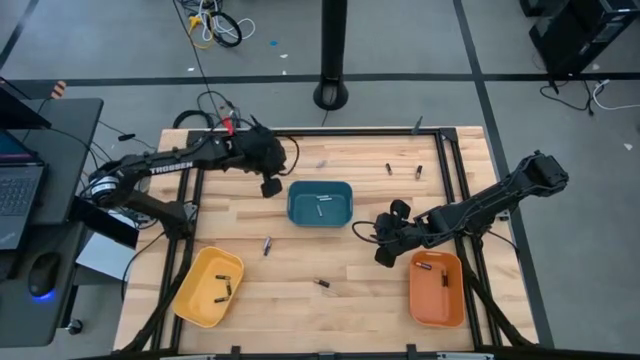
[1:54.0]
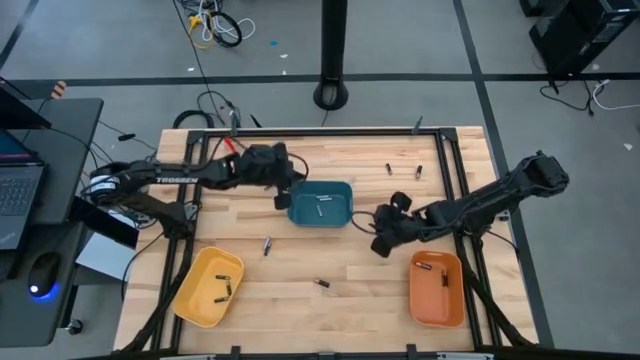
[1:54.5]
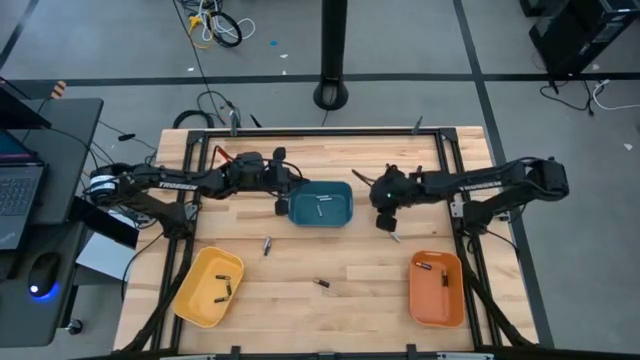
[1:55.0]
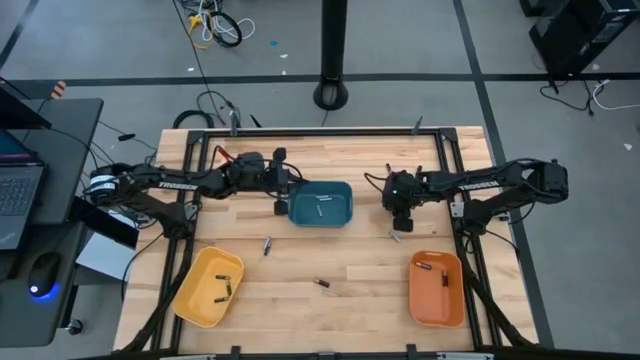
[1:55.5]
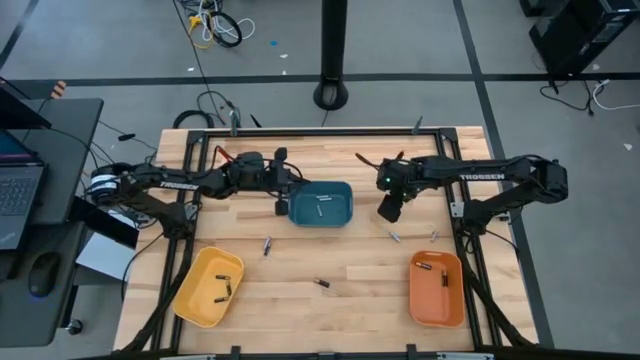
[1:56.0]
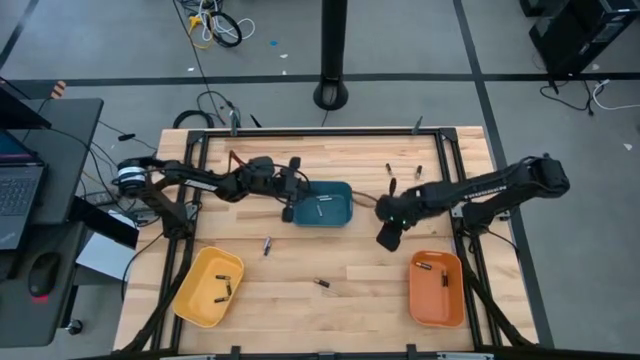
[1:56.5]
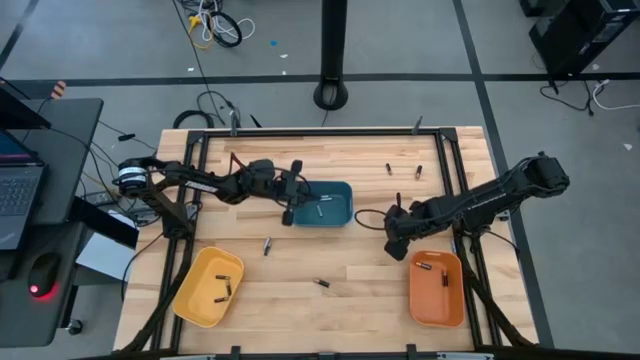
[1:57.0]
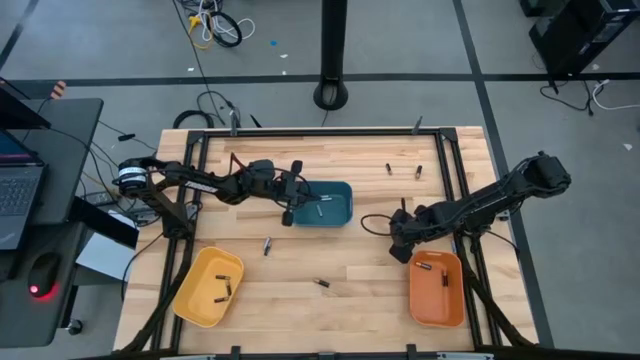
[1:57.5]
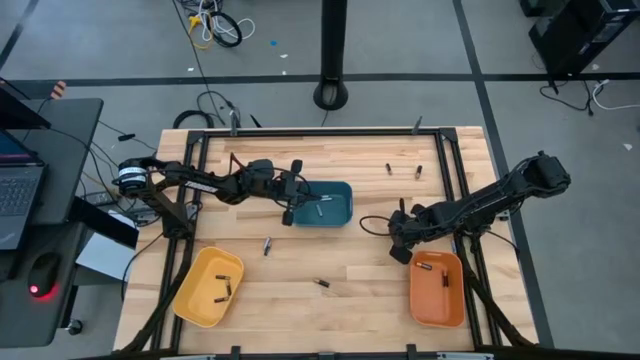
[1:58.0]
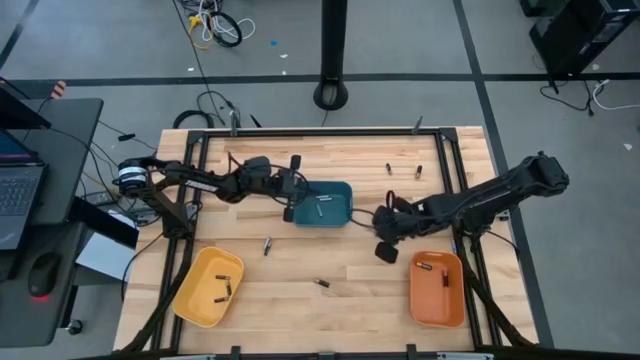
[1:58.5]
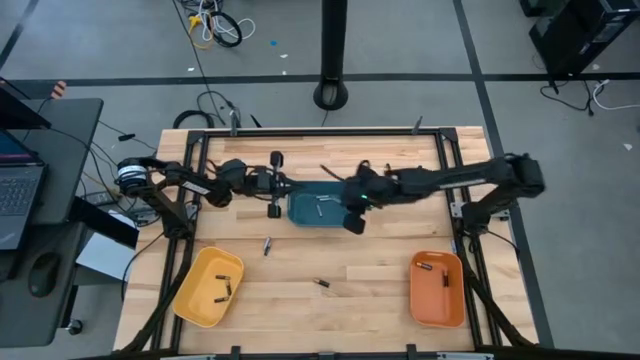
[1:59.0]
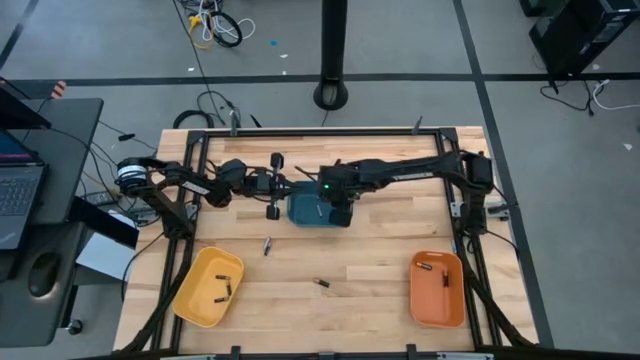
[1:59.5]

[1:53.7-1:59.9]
Task: Sort batteries
Put the silver battery into the blue bin

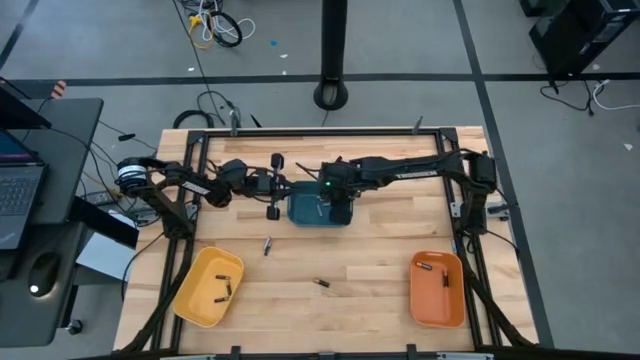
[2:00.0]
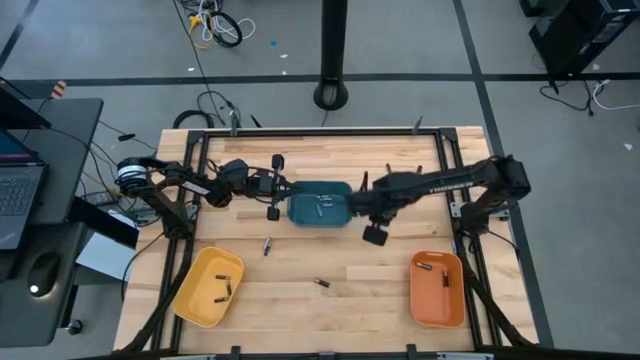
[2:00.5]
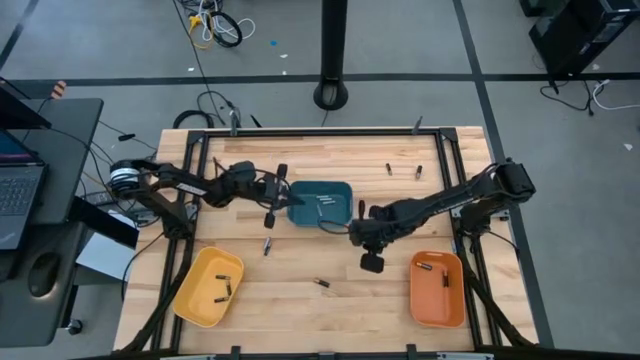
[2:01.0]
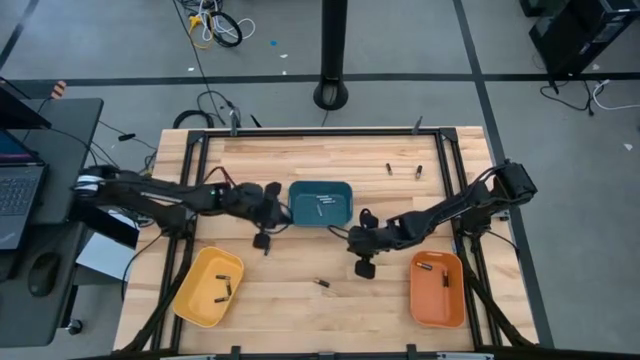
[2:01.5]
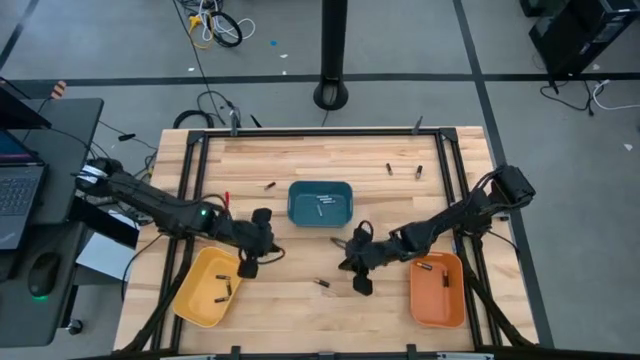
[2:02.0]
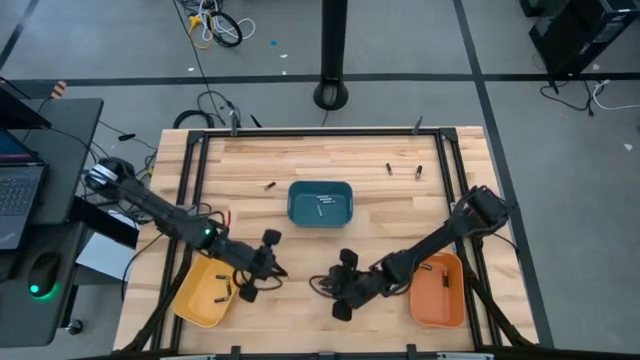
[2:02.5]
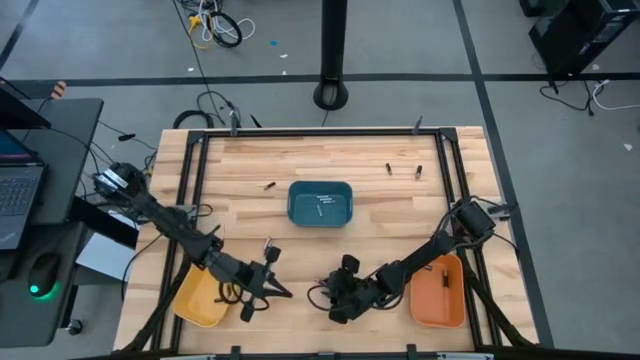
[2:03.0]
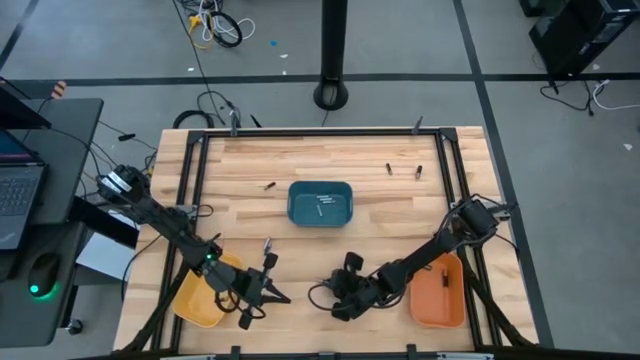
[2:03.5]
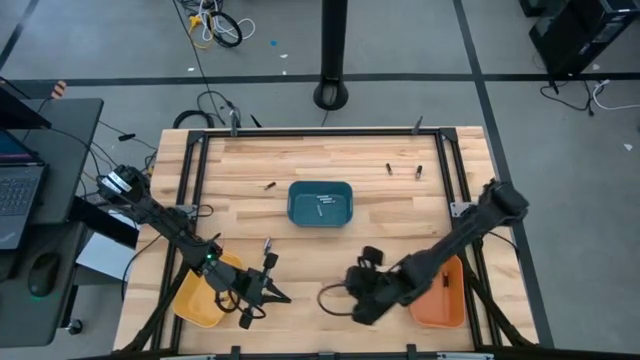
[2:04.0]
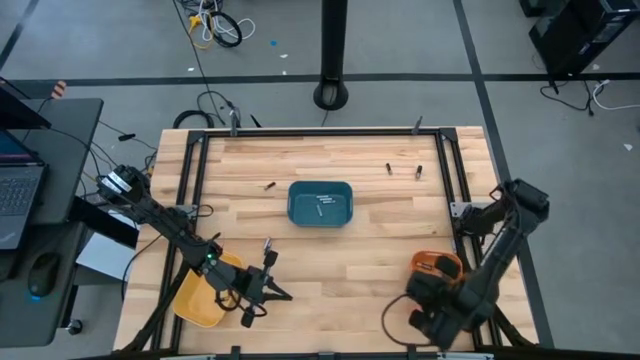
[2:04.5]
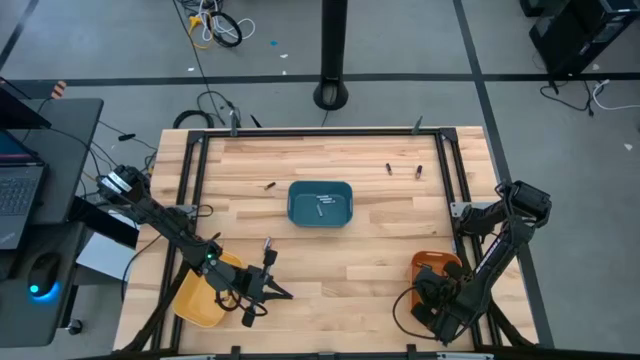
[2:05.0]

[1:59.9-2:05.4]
Put the large black battery into the orange bin

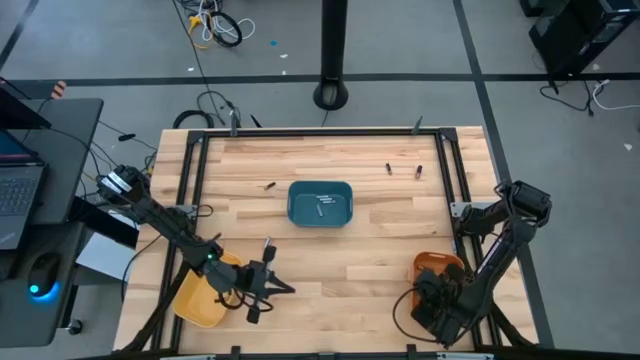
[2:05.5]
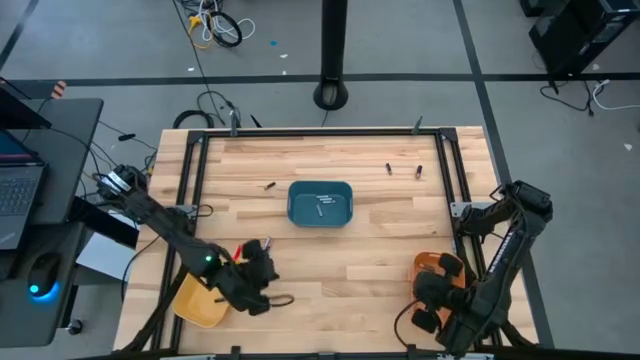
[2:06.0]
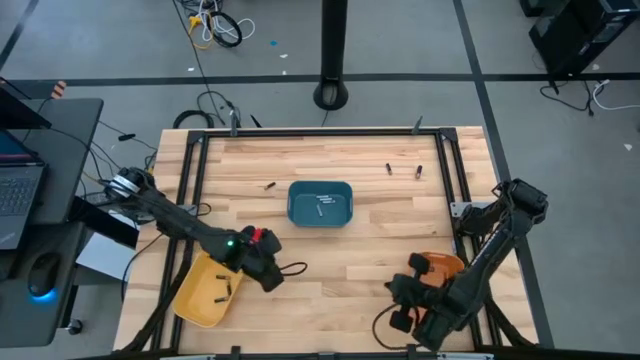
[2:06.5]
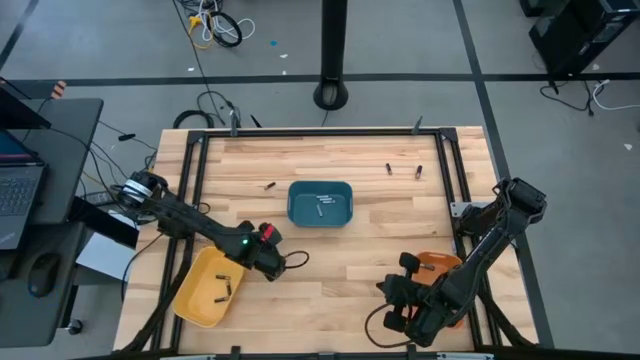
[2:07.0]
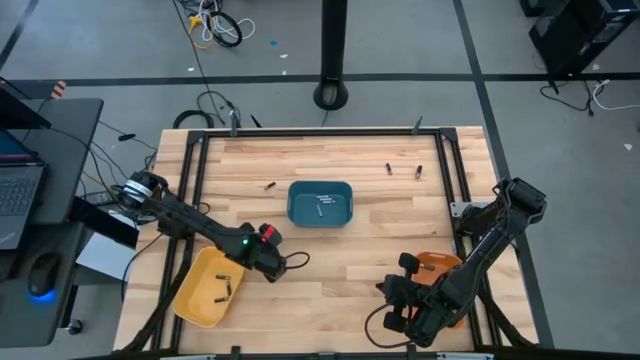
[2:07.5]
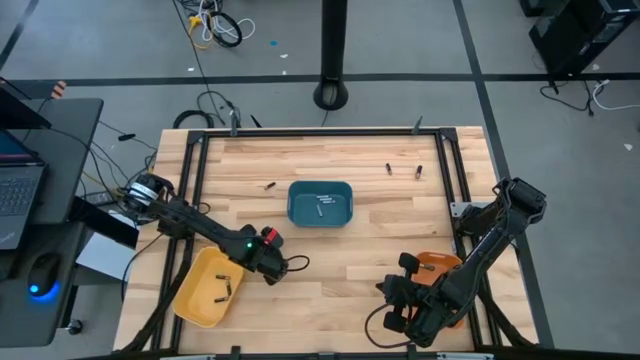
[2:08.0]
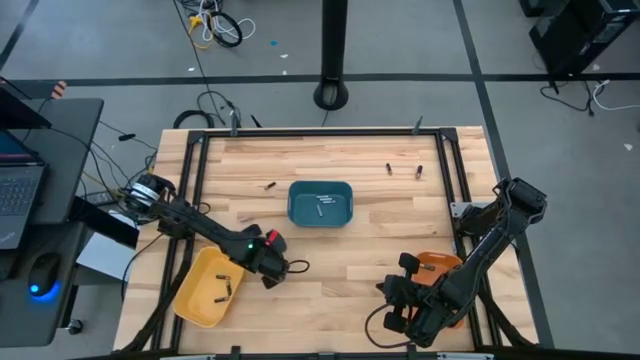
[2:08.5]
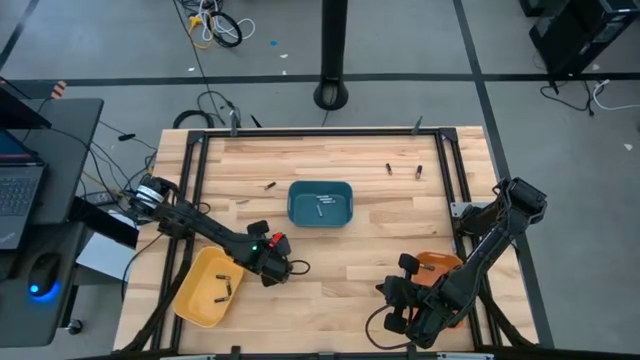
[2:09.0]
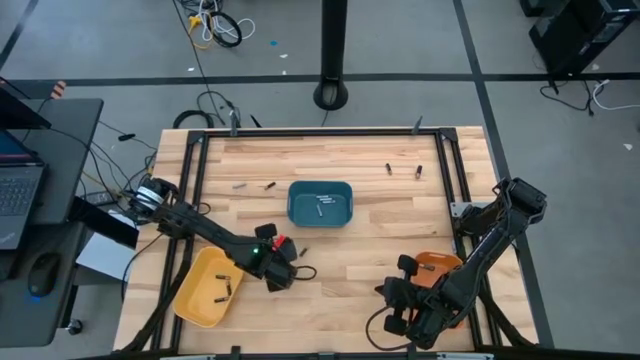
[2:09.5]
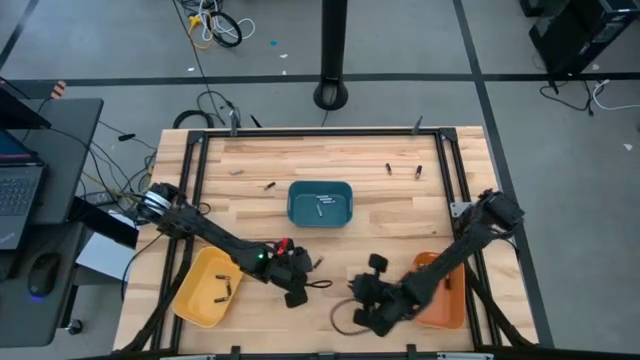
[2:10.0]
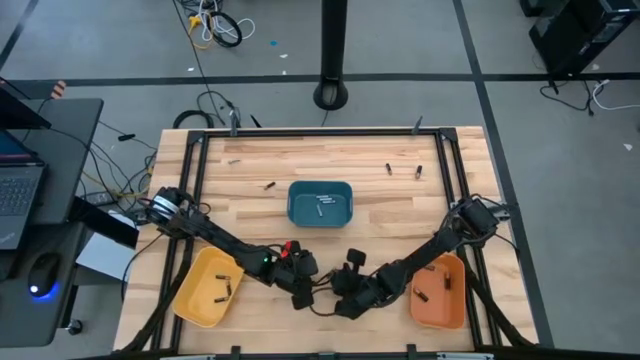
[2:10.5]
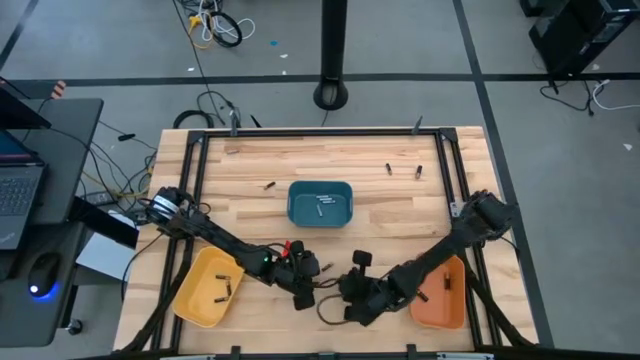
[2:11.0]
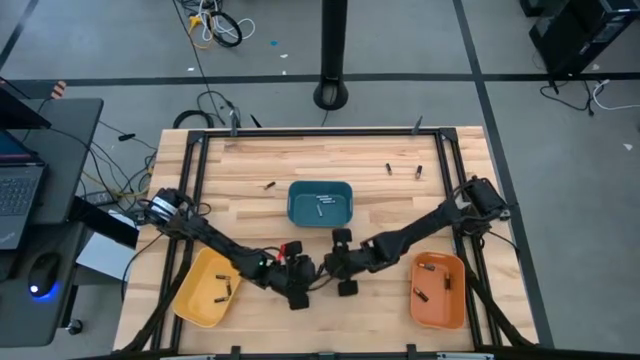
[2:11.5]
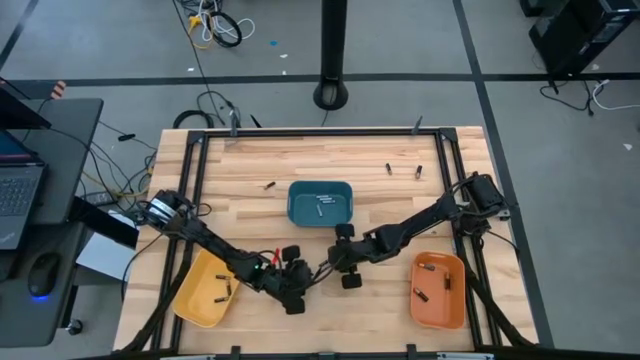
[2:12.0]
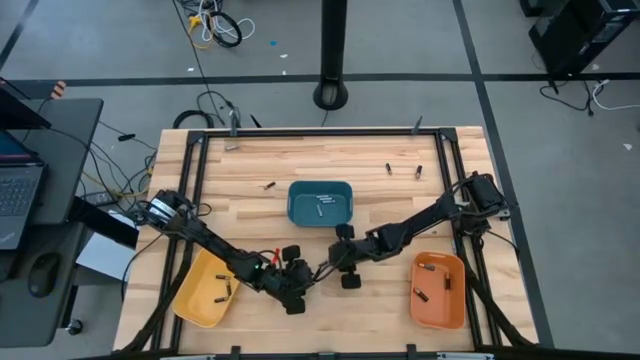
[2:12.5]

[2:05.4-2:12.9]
Put the black battery into the yellow bin

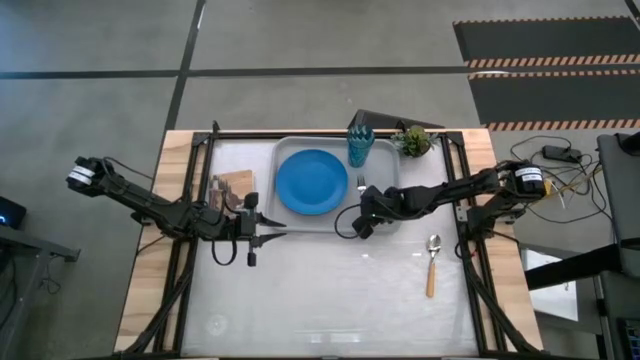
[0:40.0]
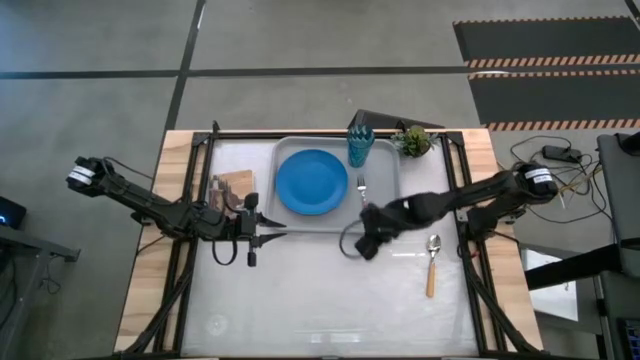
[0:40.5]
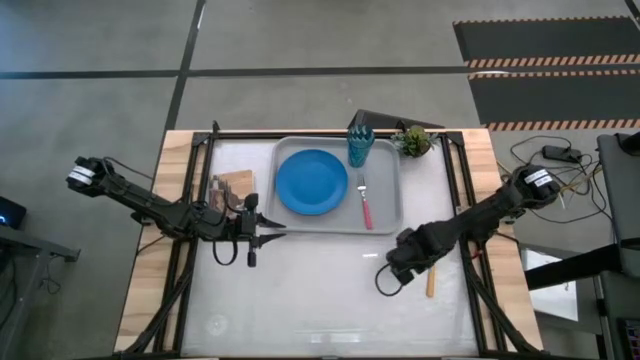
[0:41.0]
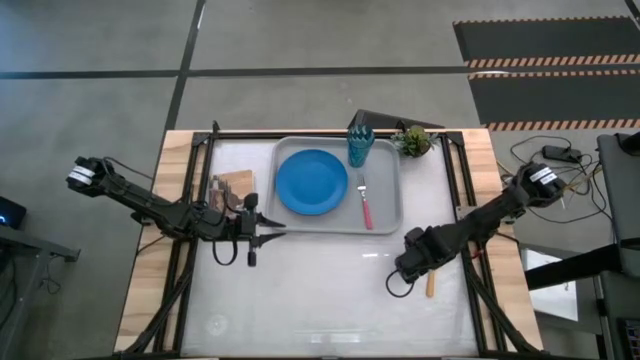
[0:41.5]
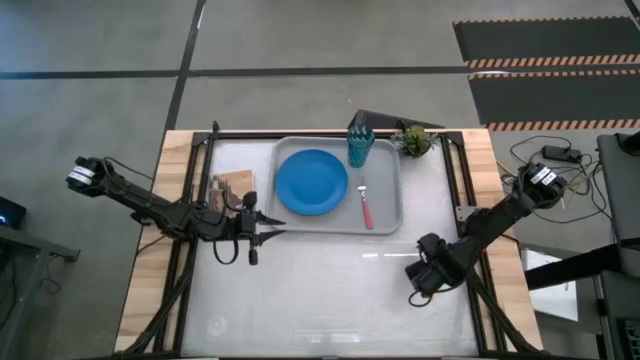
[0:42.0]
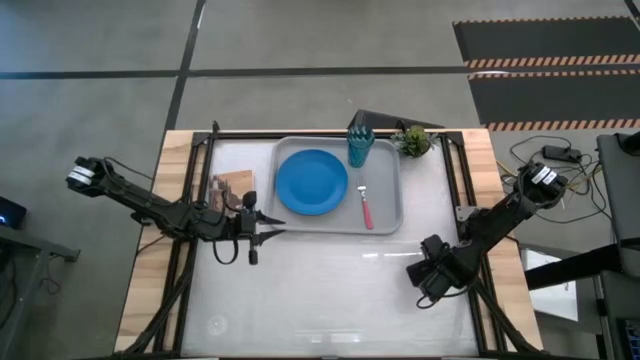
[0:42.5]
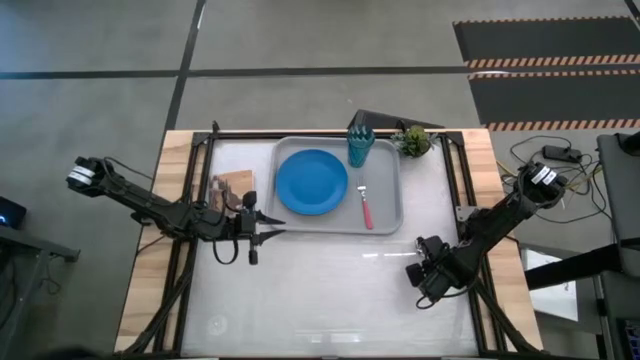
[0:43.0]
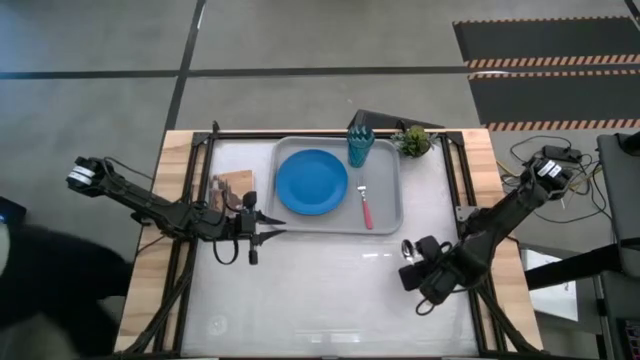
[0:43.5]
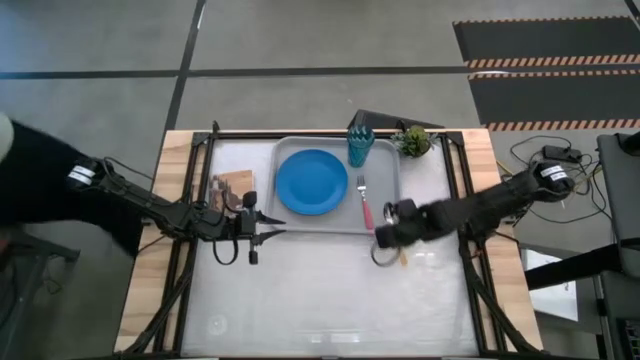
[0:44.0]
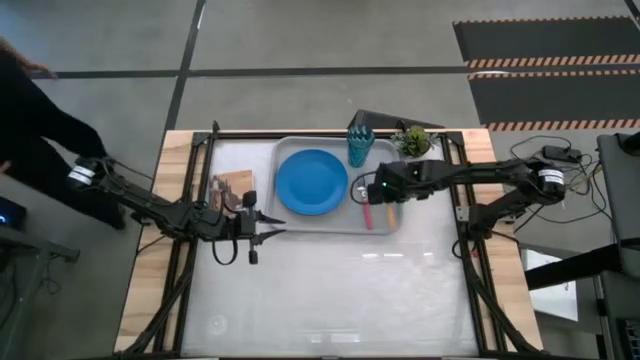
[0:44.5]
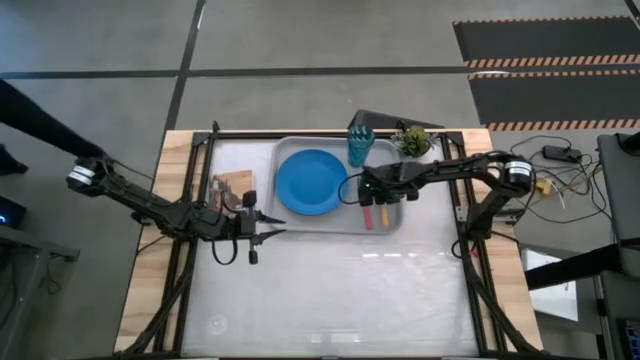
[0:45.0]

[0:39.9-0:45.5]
Task: Pick and place plate/cup/fork/spoon on tray
Put the yellow spoon beside the red fork on the gray tray
